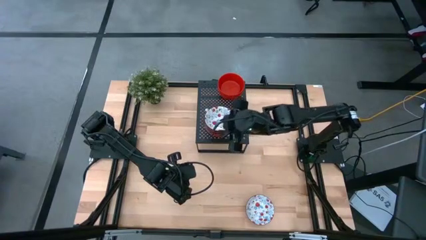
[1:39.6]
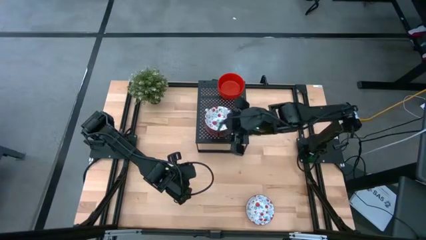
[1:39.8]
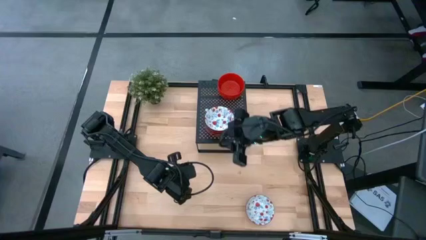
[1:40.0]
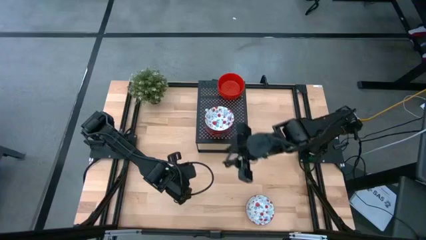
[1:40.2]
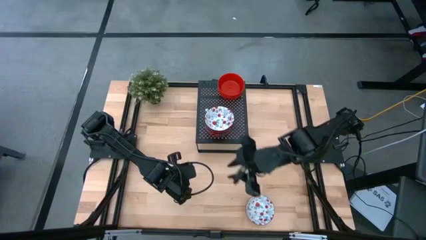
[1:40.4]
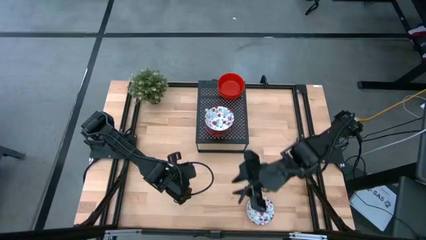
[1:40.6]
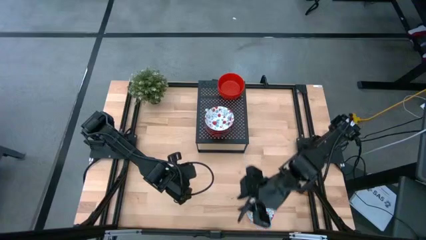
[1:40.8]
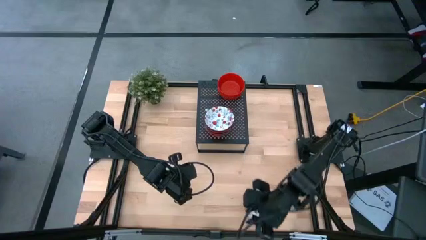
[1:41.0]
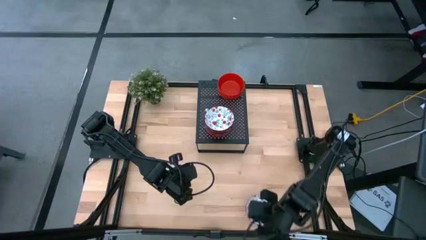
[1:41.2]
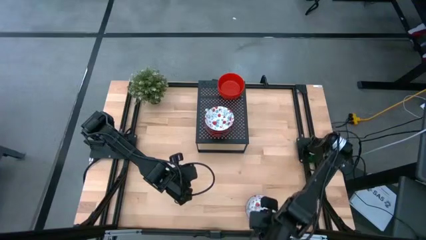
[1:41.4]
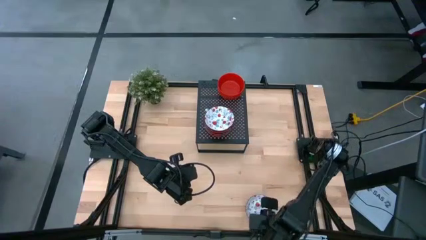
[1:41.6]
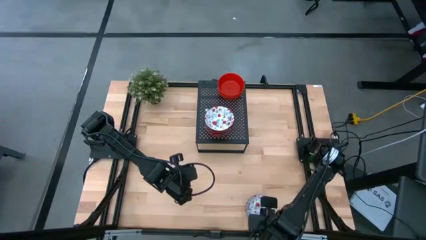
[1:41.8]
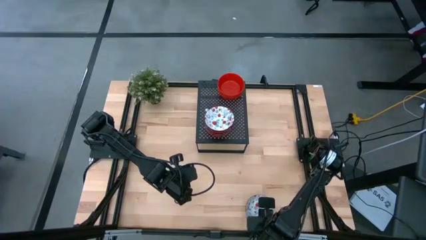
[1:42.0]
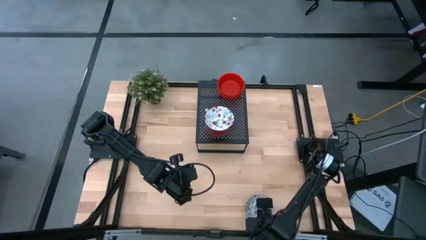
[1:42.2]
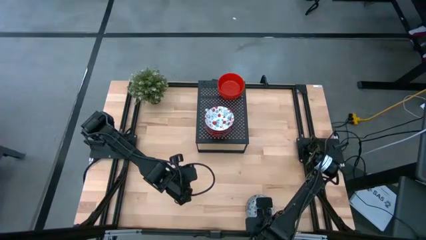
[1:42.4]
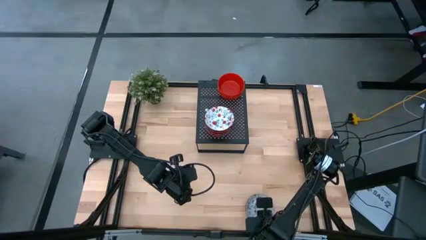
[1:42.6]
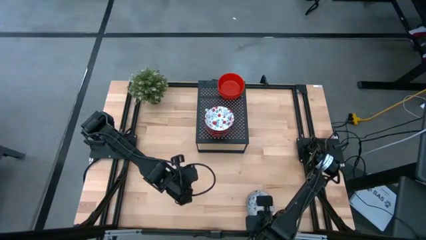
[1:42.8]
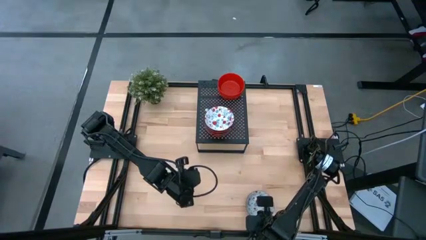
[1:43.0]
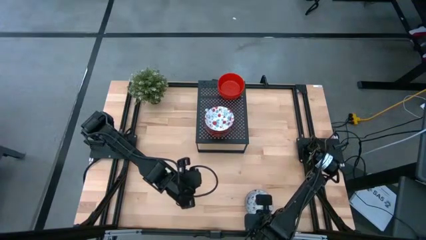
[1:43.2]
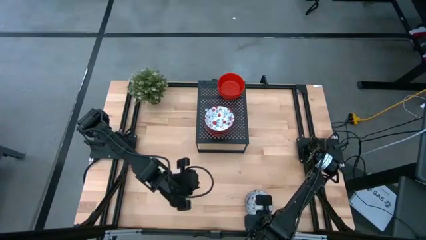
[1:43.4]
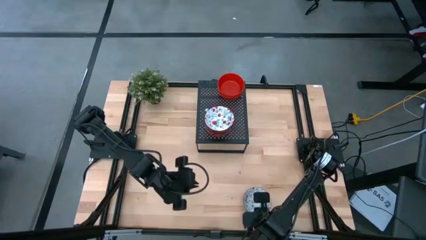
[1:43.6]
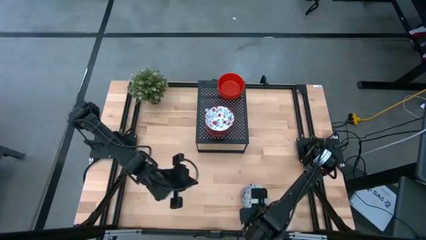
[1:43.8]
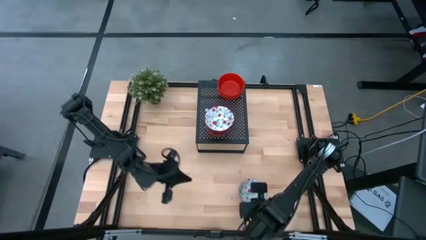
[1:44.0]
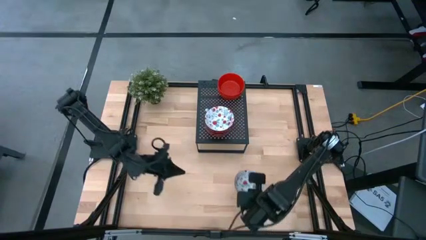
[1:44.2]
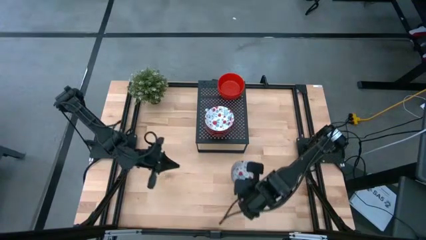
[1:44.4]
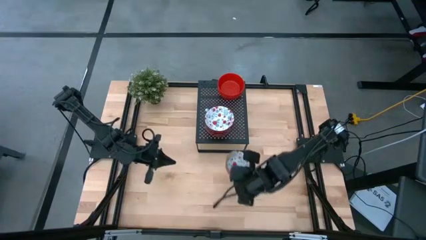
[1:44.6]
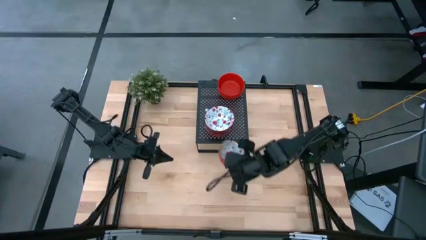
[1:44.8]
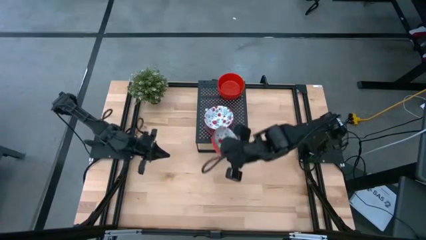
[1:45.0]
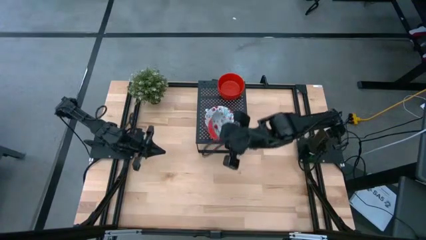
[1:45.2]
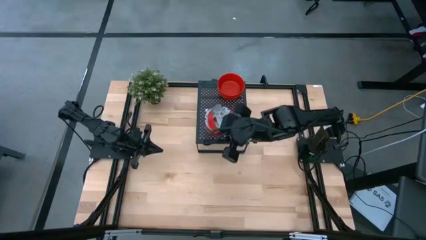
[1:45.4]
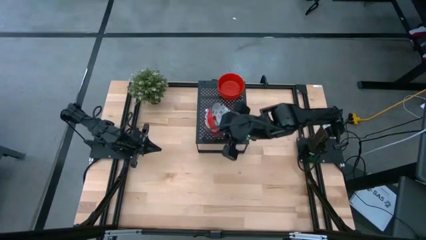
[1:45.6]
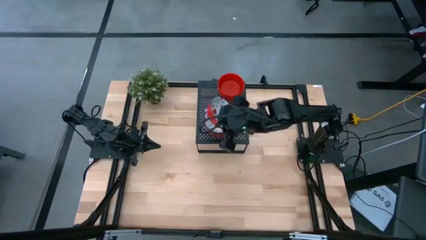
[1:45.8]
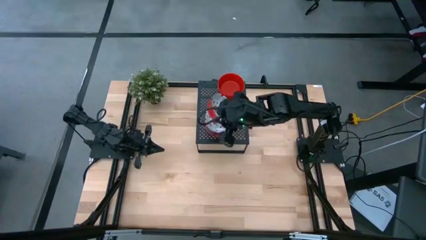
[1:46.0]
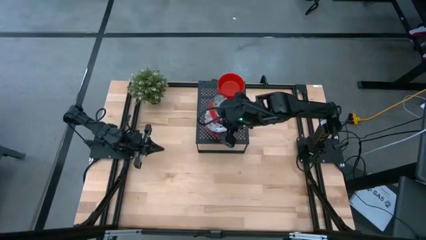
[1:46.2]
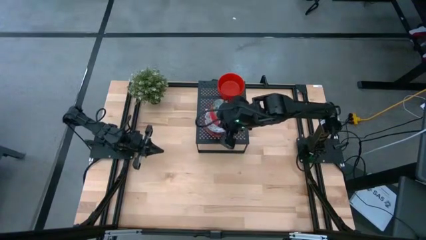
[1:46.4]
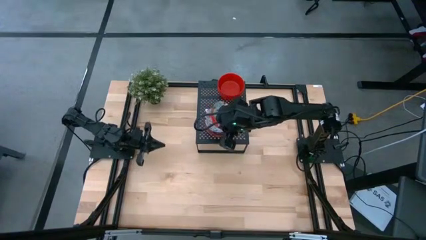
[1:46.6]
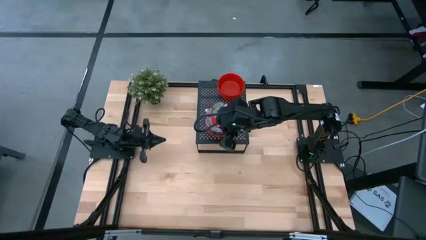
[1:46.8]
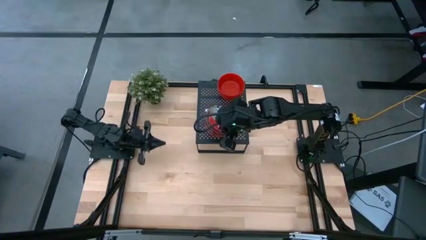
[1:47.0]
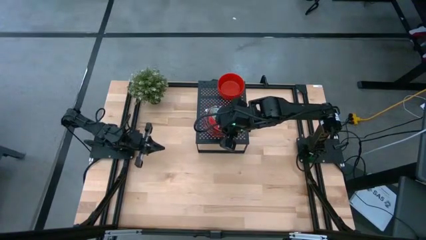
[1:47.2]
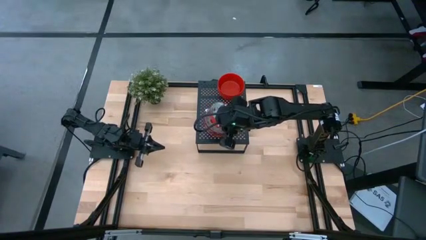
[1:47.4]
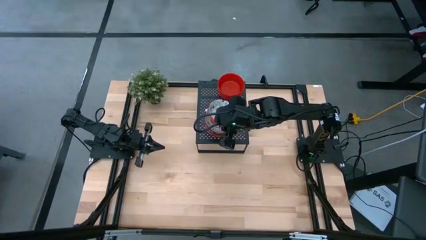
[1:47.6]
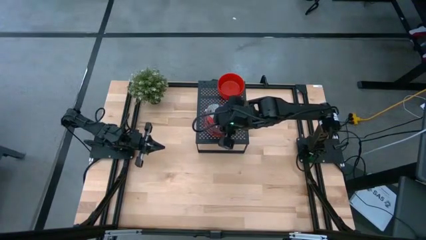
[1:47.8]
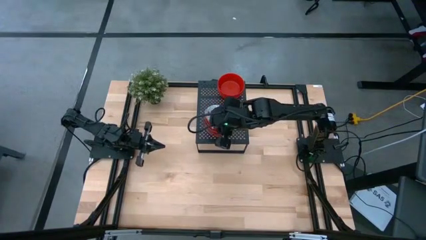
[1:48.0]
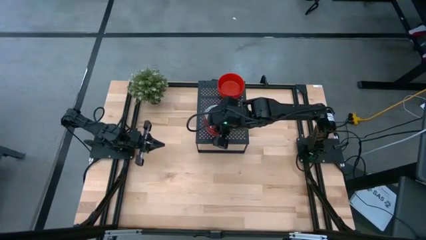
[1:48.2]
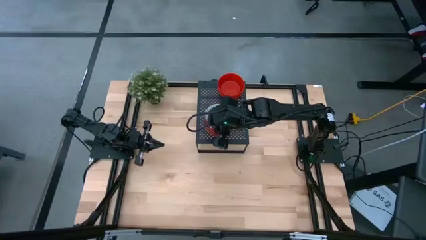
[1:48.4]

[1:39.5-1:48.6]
Task: Pick & Place Mini bowls
Stack the white patterned bowl on top of the other white patterned bowl on the shelf

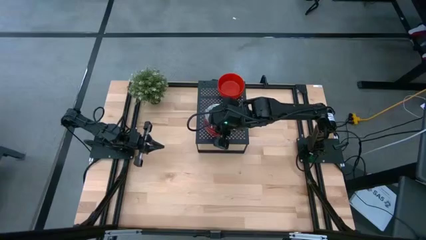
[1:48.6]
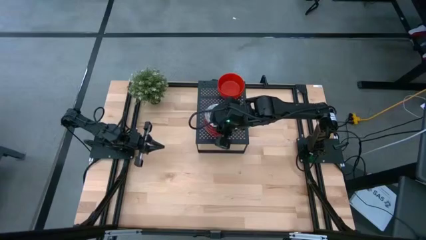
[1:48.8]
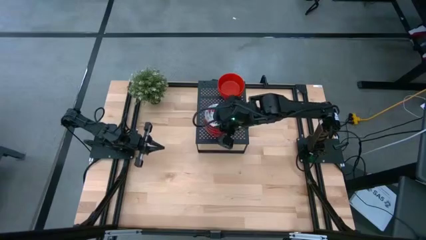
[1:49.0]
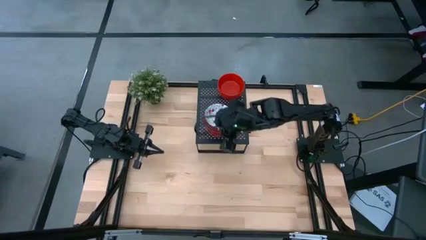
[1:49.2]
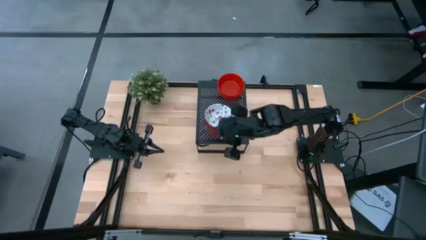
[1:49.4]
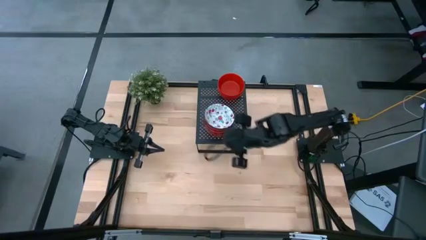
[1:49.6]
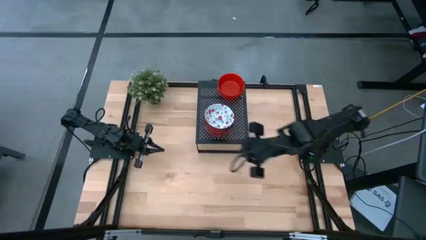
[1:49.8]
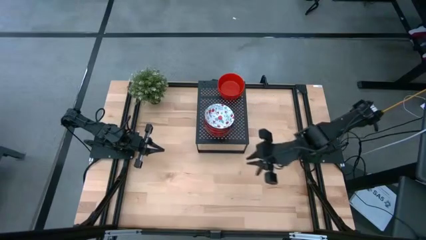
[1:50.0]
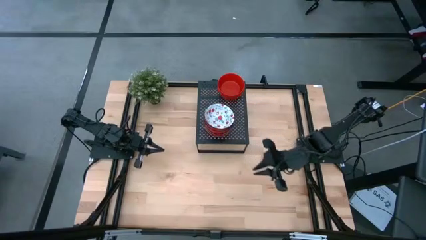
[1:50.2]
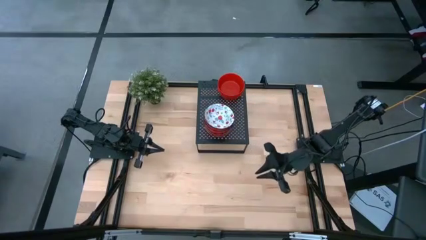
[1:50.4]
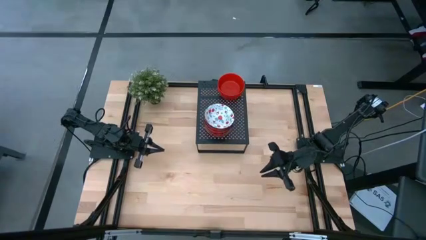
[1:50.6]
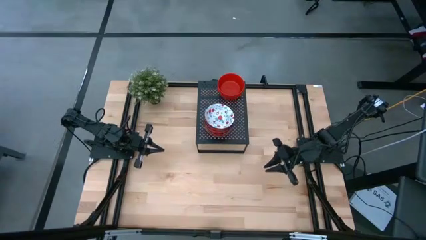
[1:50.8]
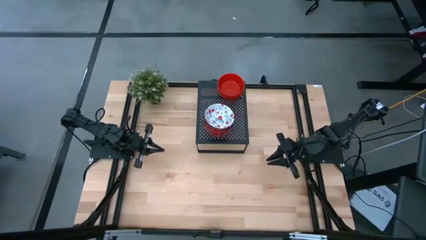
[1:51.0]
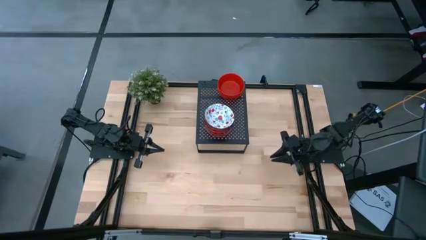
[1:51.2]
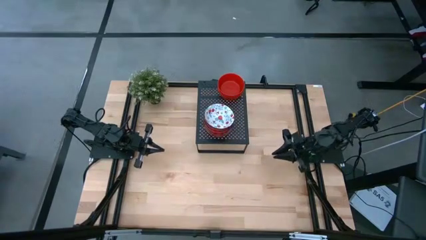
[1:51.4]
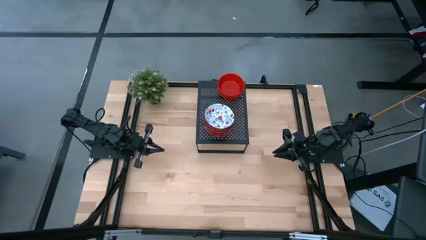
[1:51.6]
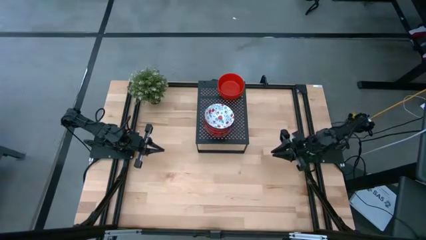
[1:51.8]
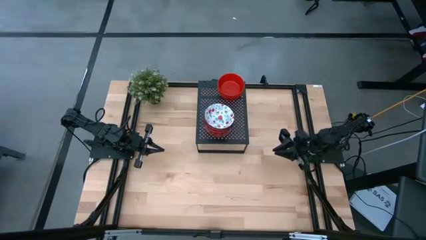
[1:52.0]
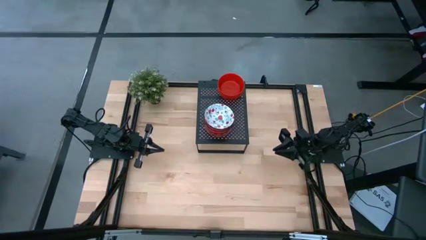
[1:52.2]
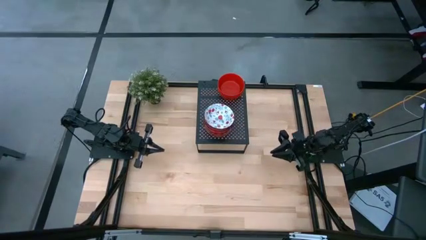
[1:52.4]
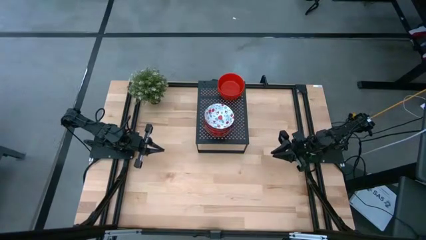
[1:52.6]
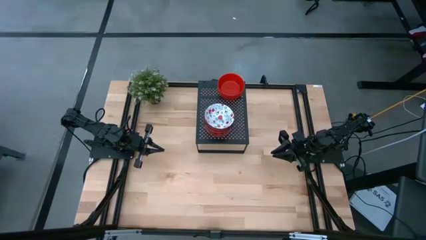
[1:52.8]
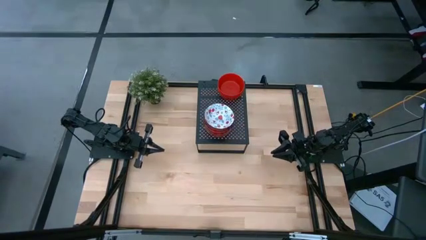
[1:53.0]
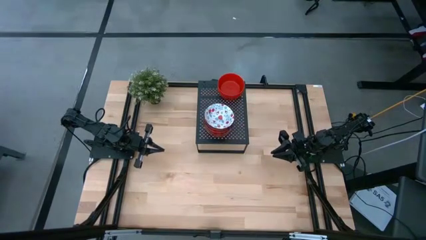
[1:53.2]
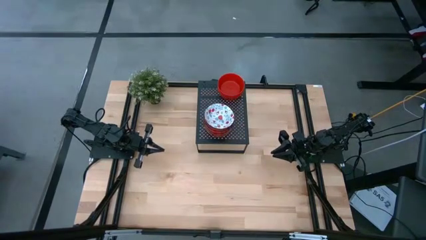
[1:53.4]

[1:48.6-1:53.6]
Return to Home Position
